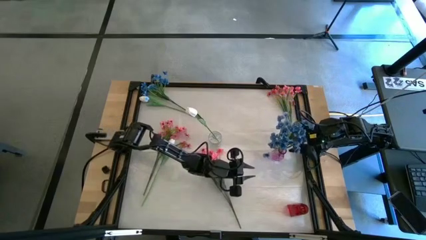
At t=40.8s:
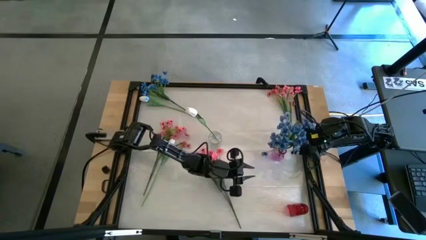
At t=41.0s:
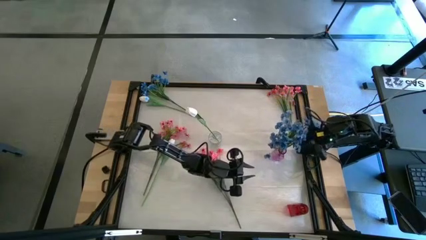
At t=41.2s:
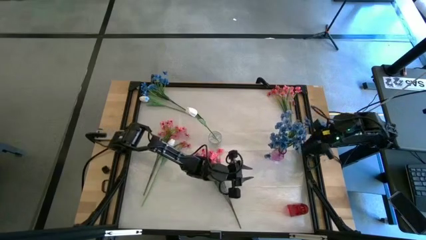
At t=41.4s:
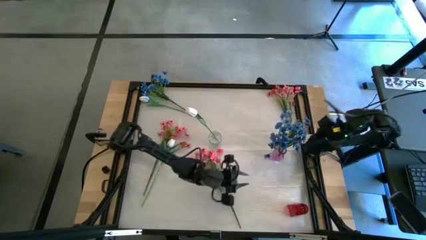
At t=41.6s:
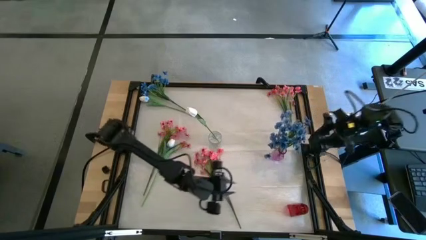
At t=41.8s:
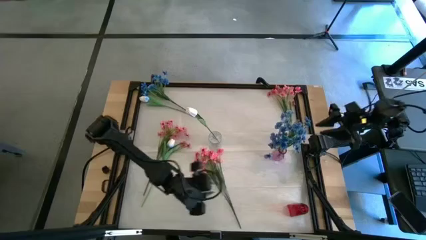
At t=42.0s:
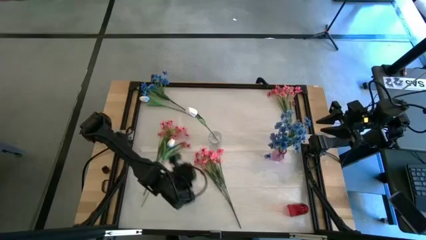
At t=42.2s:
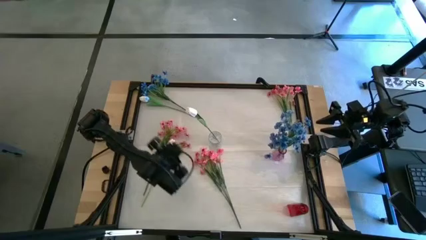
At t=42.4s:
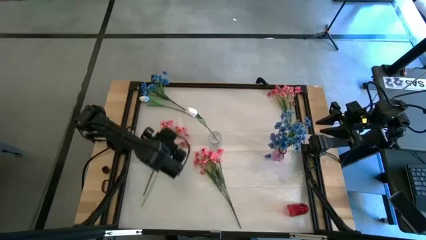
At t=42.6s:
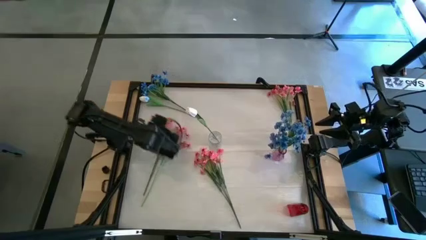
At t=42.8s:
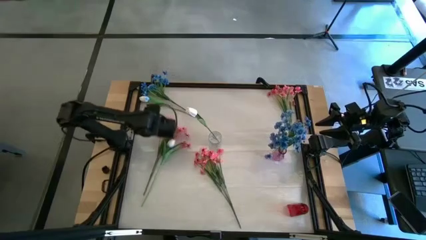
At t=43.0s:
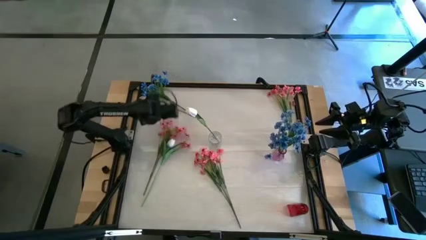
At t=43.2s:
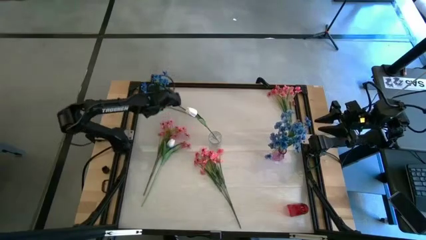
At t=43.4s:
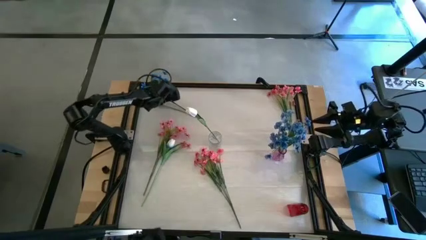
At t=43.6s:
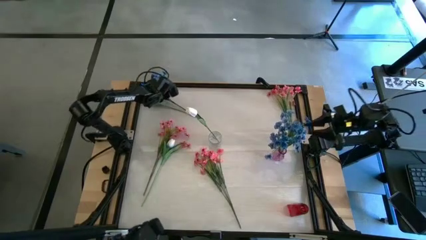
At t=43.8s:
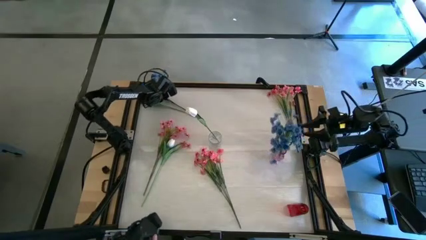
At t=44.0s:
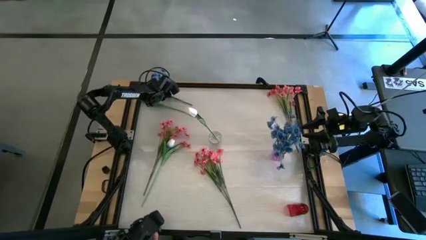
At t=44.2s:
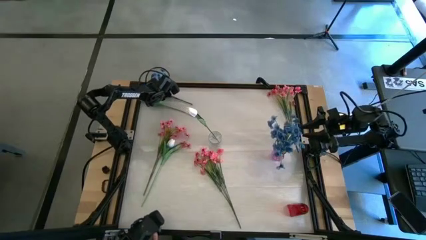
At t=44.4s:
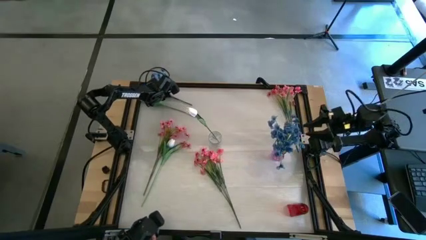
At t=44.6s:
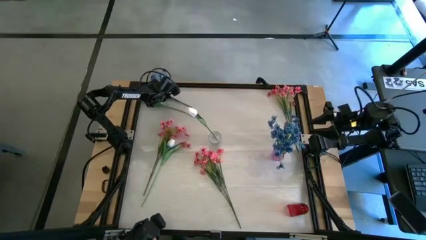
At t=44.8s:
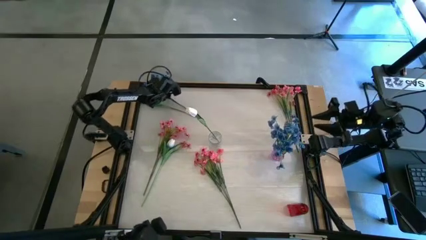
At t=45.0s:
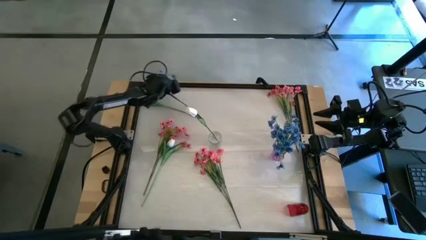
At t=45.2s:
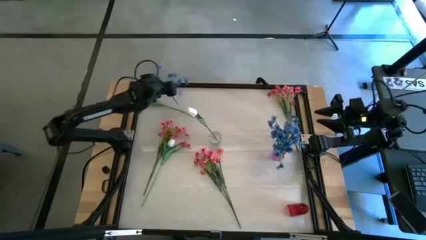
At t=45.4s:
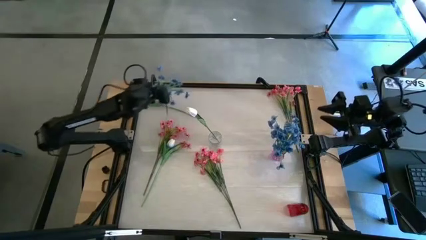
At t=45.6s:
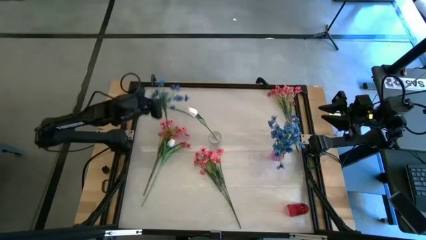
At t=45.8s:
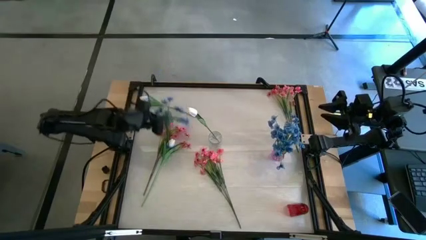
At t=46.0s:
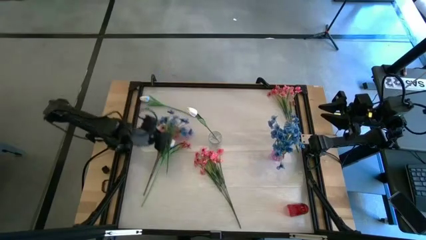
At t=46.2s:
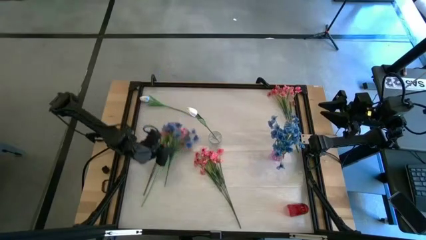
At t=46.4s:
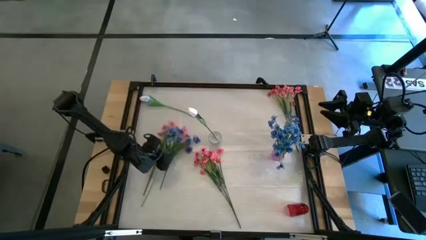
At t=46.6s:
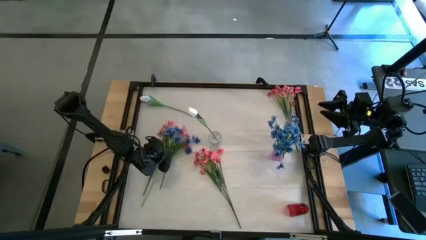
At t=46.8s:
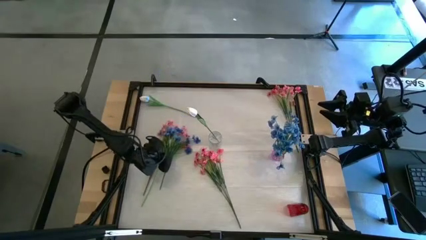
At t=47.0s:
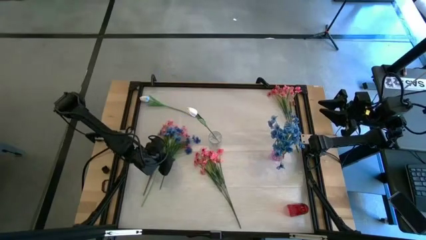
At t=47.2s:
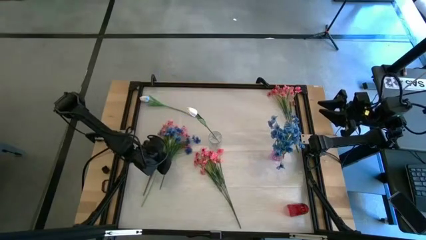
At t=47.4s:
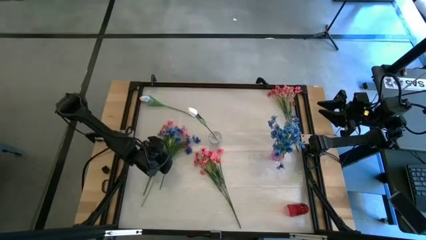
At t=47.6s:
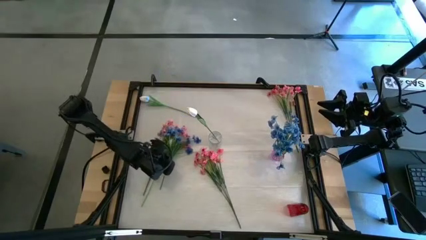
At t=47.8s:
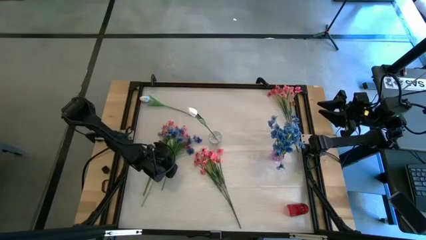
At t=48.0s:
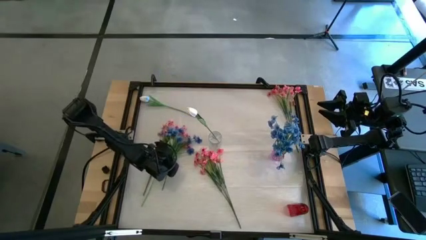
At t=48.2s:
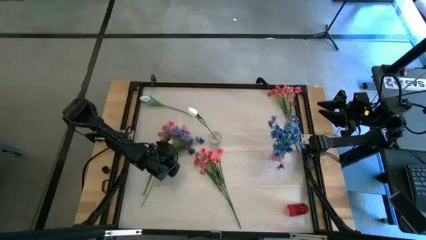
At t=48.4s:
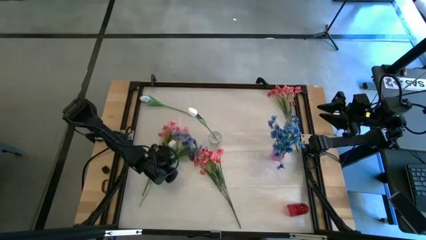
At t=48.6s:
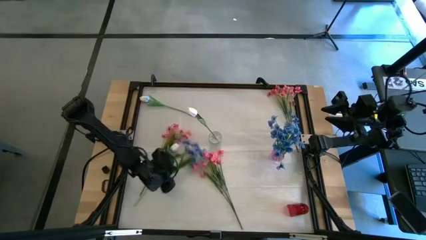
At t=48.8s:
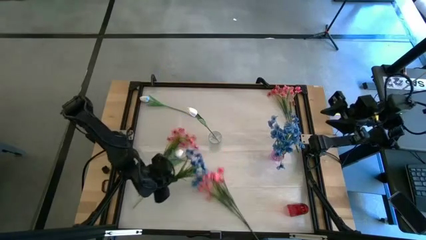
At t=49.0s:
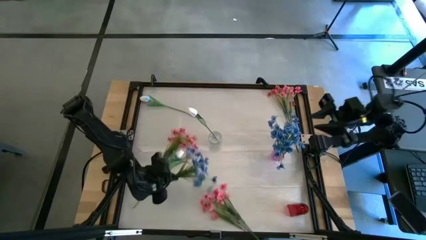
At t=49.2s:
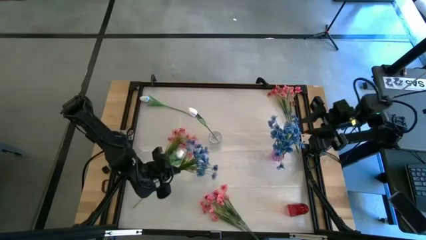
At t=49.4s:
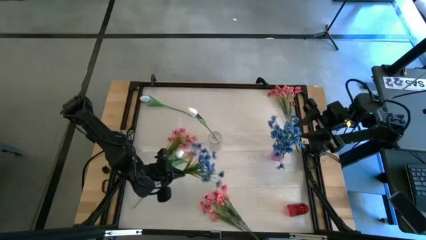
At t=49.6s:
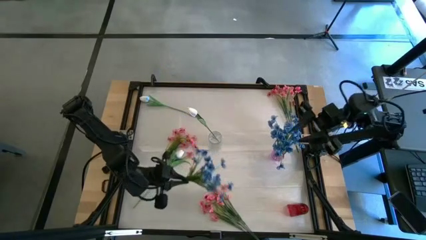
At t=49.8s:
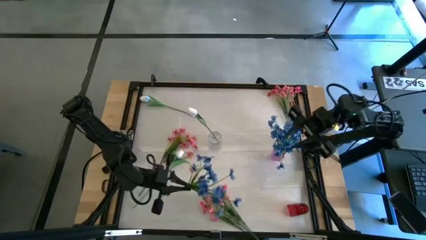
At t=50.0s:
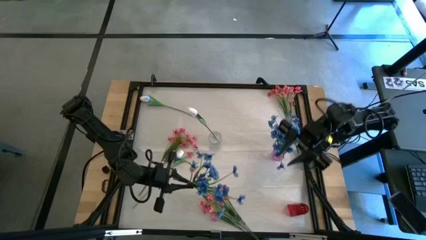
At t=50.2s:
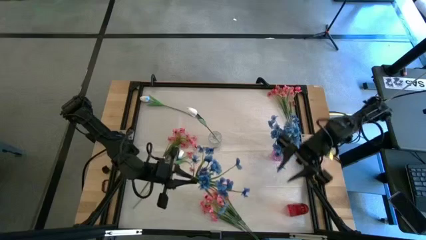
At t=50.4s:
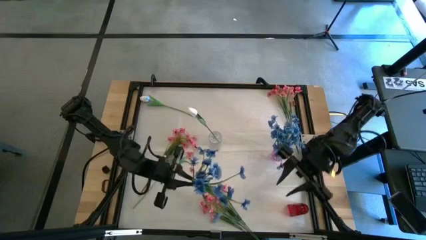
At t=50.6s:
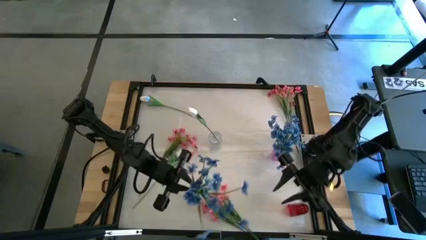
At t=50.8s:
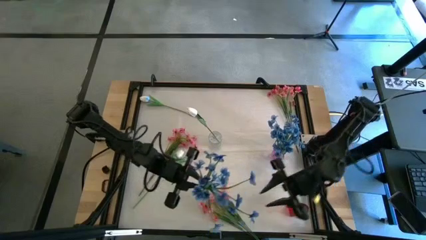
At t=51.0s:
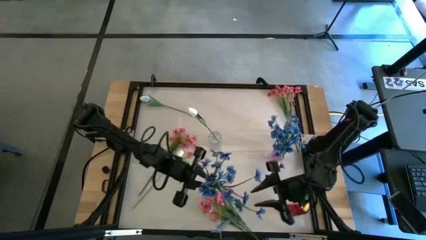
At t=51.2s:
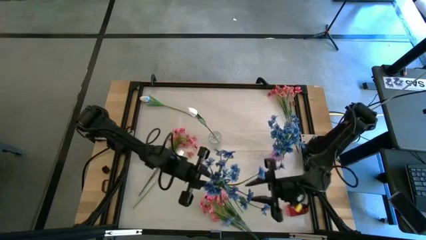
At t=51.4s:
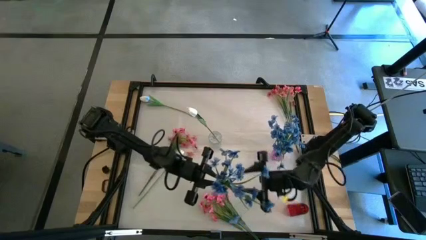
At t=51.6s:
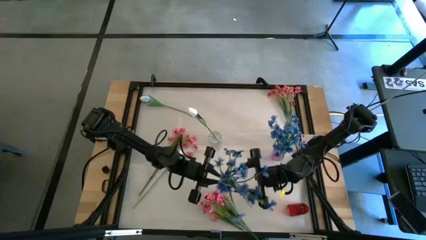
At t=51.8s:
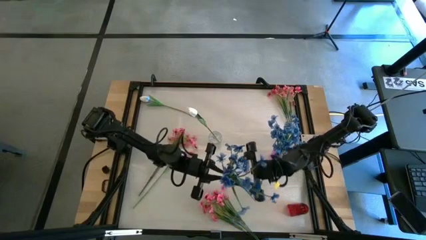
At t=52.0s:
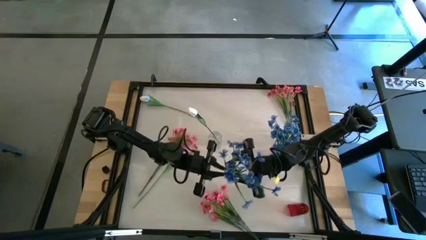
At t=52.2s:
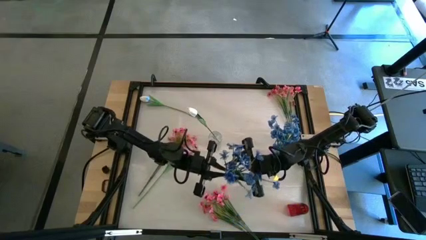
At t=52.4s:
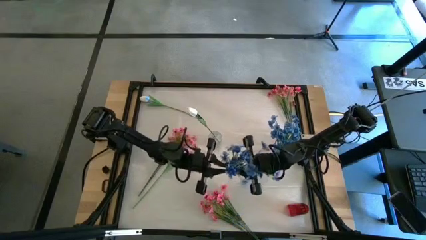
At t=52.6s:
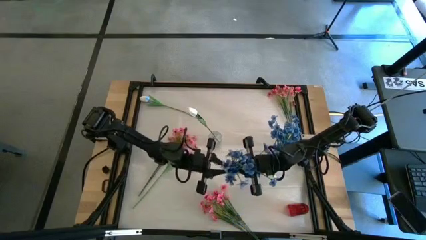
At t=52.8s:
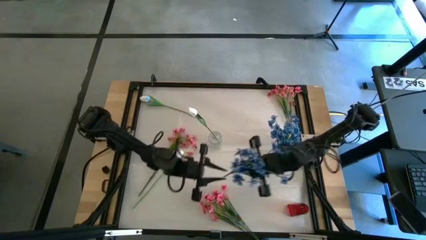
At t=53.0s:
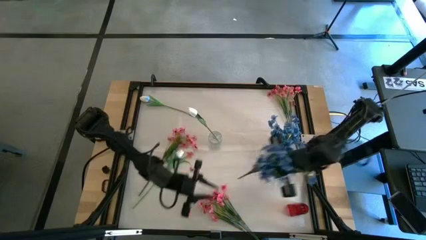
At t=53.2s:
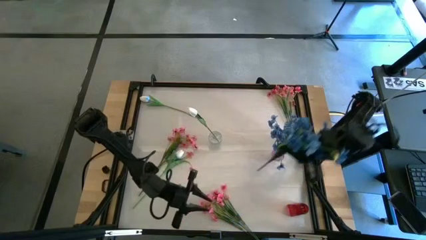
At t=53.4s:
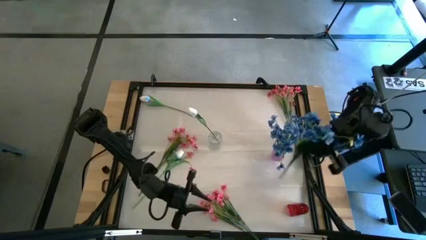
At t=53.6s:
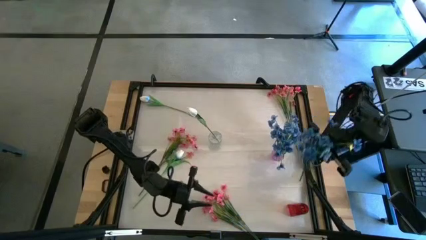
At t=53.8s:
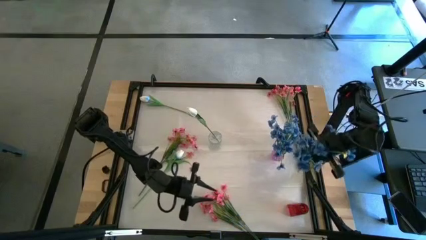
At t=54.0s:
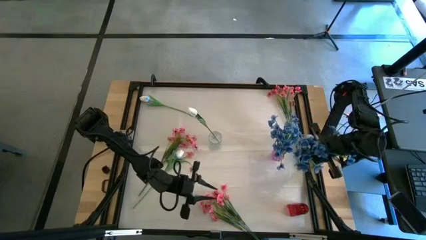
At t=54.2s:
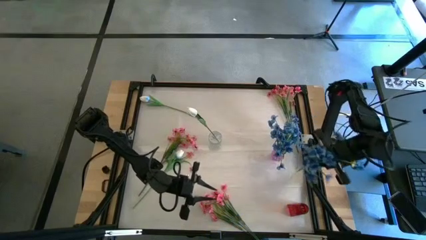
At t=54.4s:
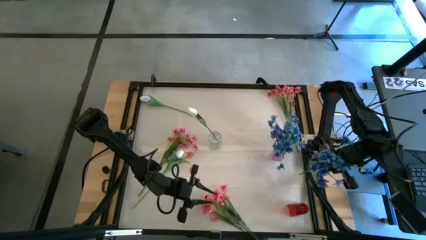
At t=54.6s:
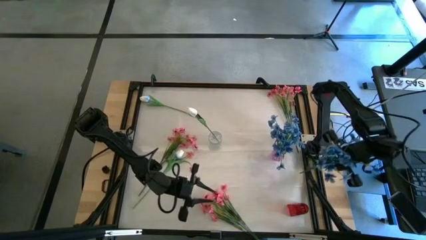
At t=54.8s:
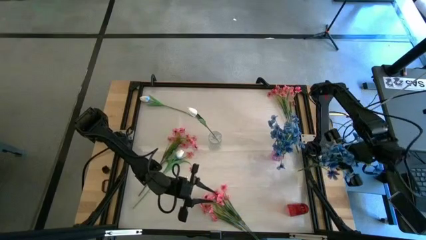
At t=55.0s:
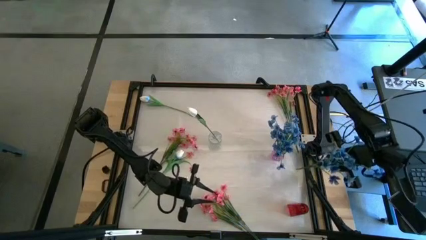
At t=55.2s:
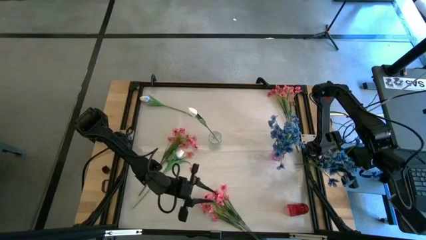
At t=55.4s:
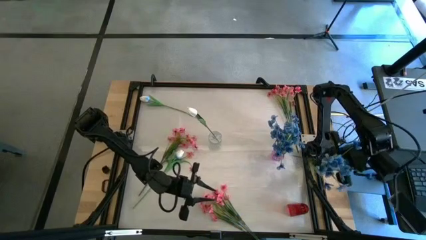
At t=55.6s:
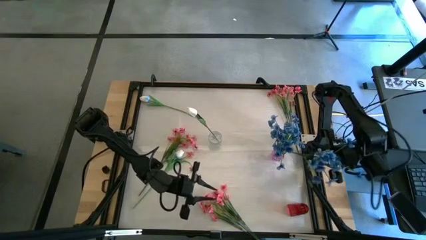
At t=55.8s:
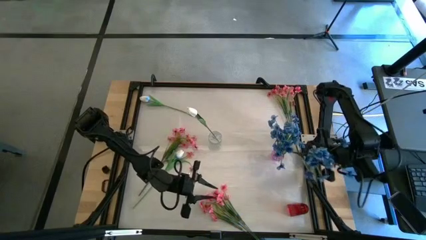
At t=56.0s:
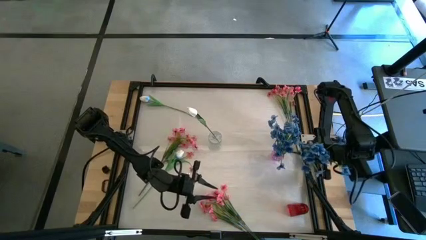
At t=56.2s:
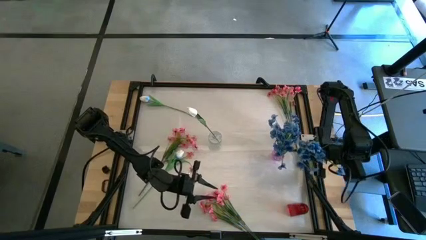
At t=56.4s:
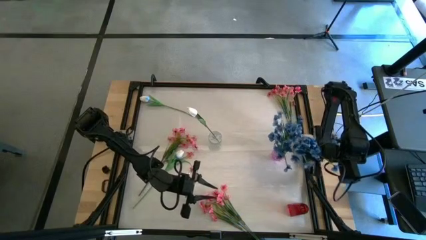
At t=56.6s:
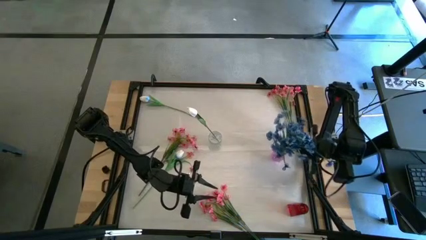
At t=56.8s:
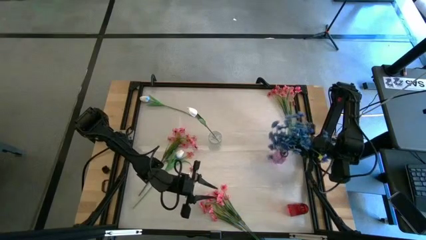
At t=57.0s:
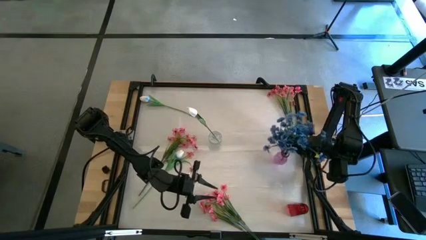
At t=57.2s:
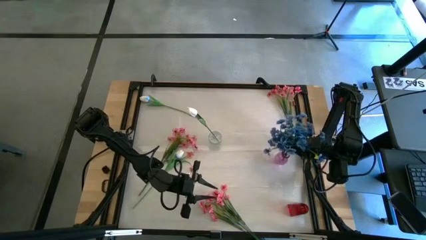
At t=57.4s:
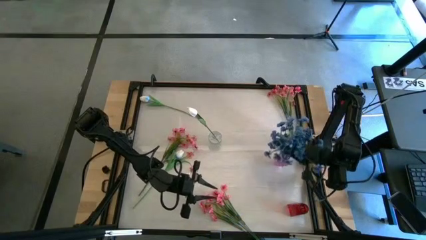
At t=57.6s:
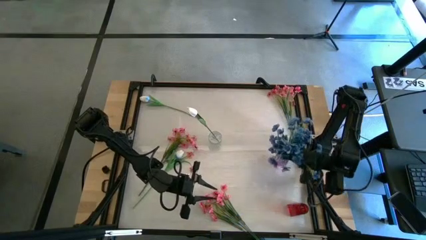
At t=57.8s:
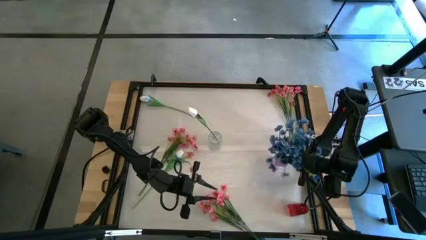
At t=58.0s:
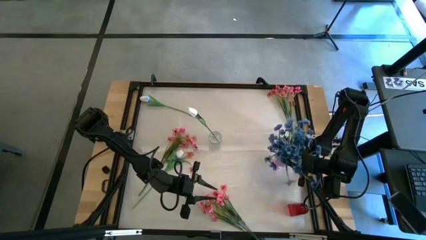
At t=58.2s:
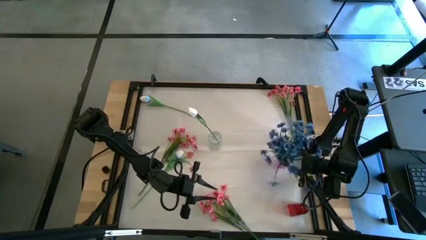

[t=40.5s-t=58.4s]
Task: Sort flowers into vase by color
Put the blue flower into the purple vase
